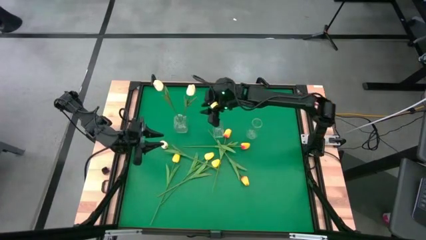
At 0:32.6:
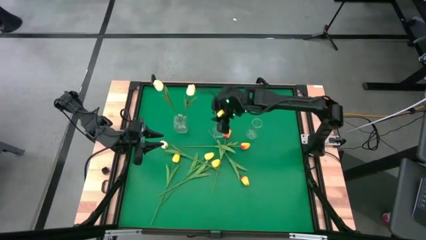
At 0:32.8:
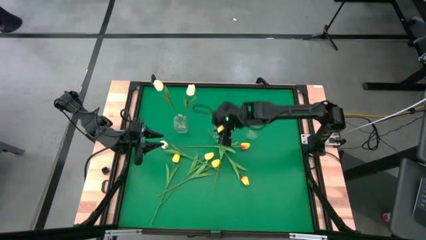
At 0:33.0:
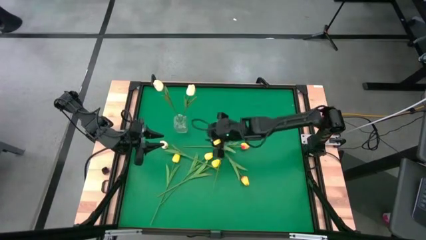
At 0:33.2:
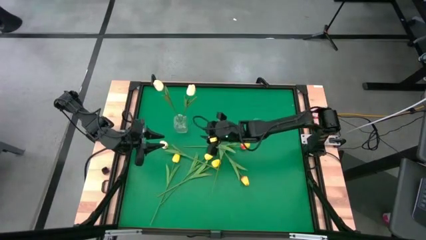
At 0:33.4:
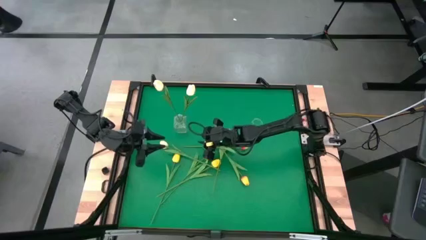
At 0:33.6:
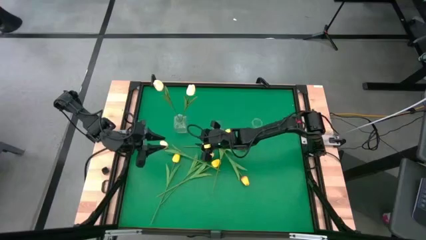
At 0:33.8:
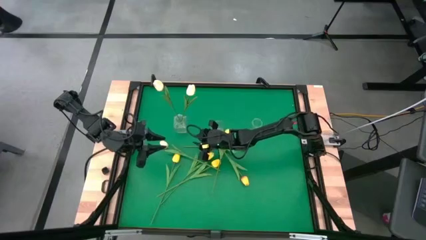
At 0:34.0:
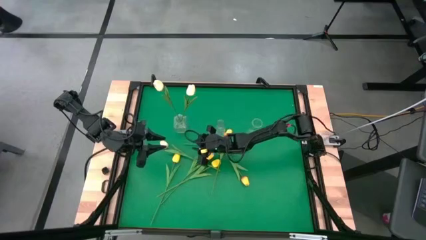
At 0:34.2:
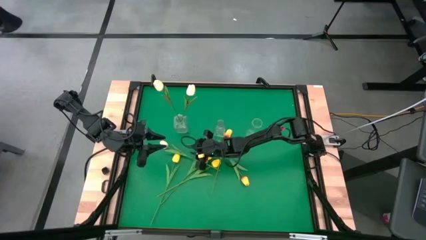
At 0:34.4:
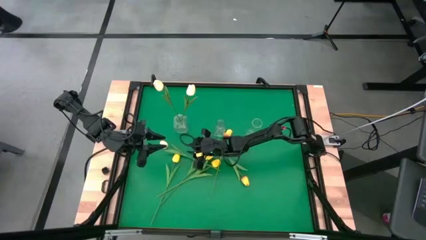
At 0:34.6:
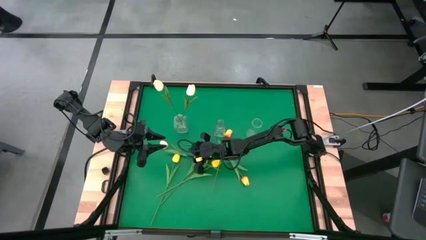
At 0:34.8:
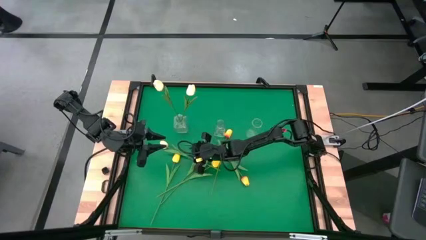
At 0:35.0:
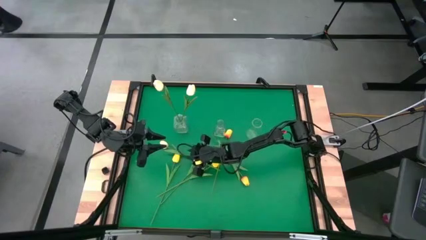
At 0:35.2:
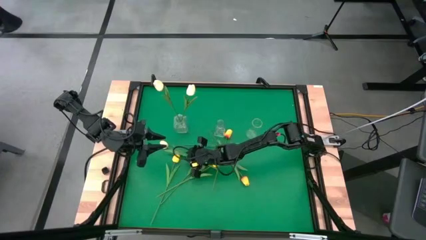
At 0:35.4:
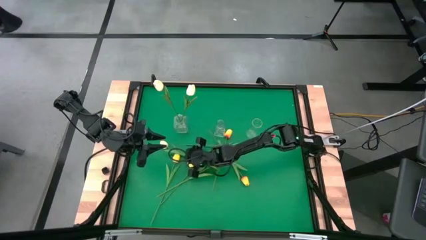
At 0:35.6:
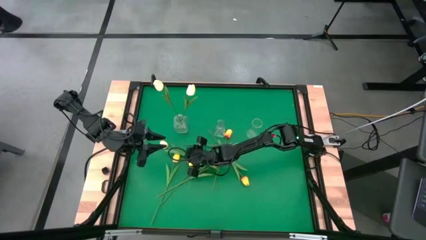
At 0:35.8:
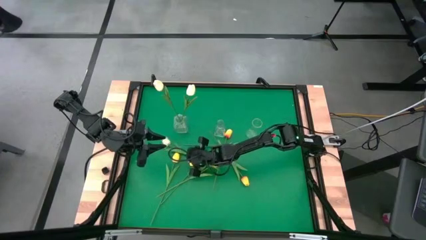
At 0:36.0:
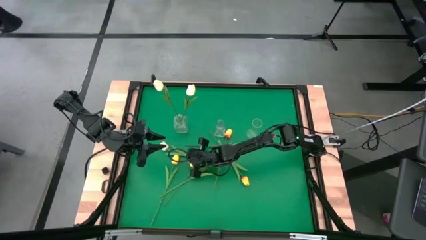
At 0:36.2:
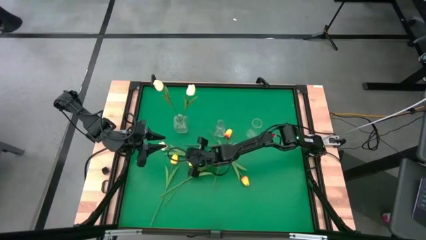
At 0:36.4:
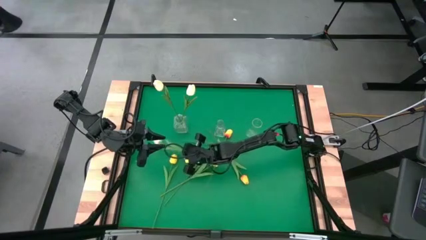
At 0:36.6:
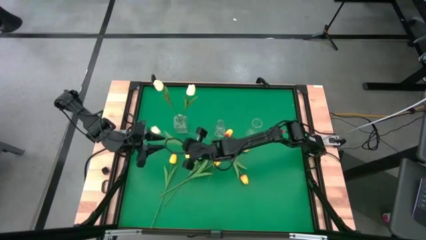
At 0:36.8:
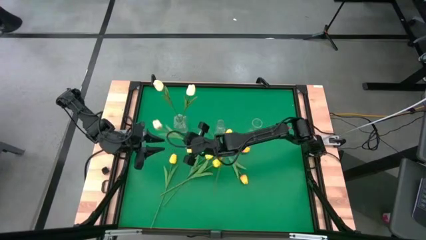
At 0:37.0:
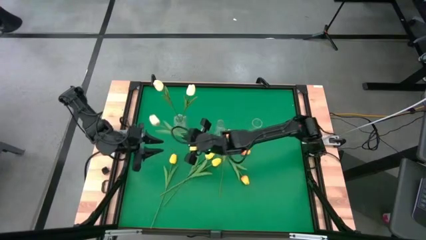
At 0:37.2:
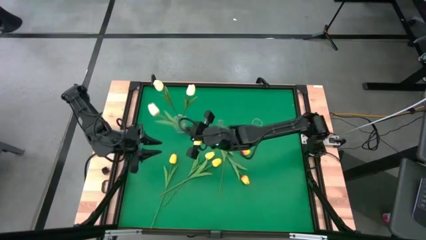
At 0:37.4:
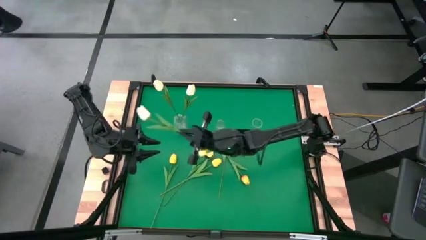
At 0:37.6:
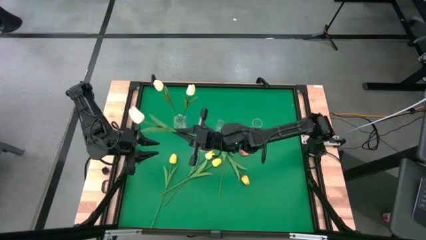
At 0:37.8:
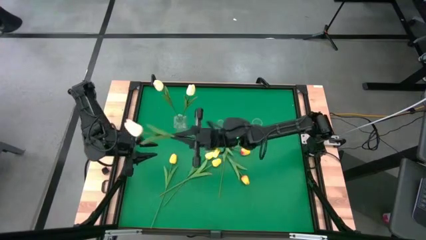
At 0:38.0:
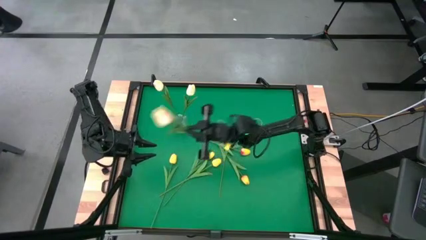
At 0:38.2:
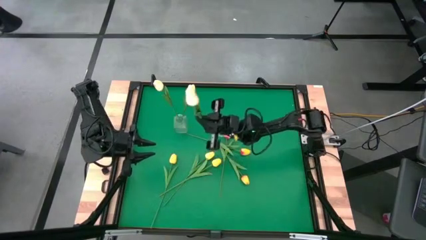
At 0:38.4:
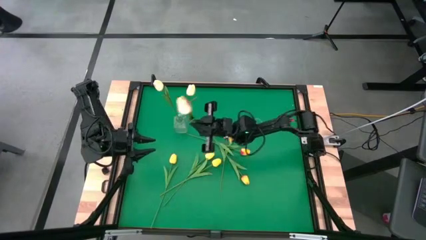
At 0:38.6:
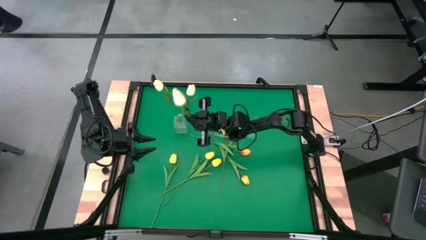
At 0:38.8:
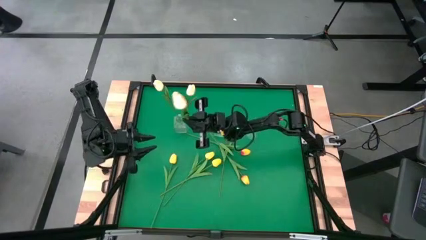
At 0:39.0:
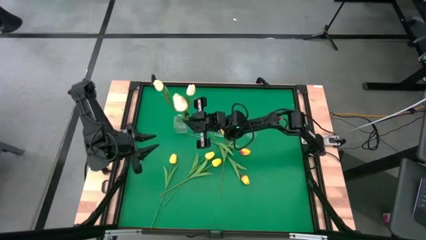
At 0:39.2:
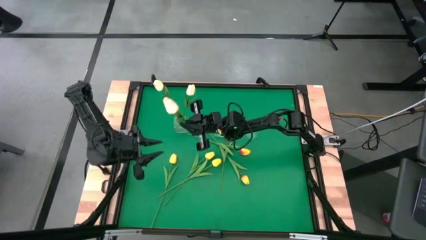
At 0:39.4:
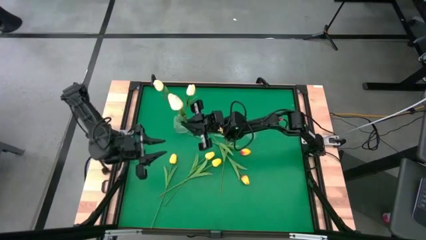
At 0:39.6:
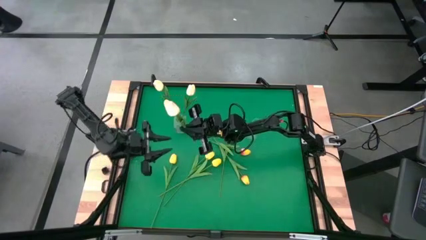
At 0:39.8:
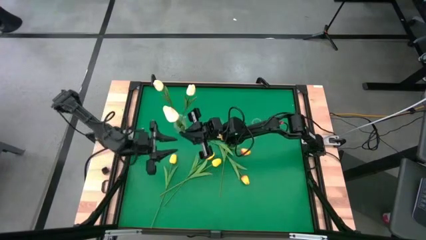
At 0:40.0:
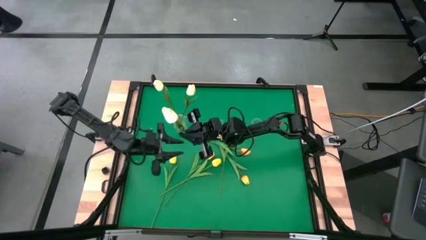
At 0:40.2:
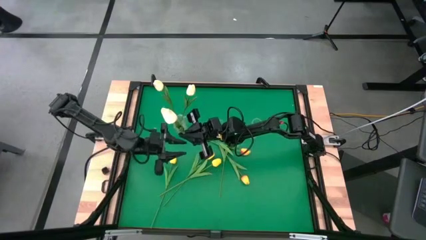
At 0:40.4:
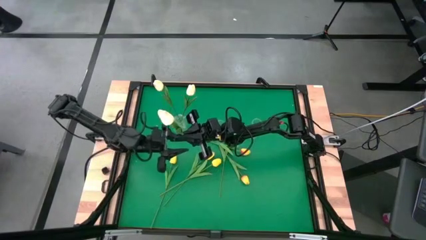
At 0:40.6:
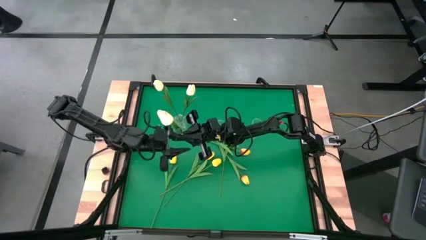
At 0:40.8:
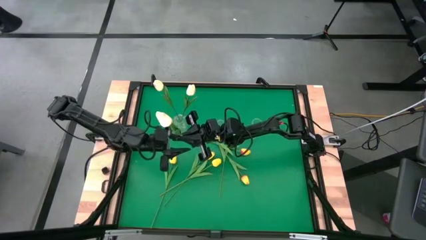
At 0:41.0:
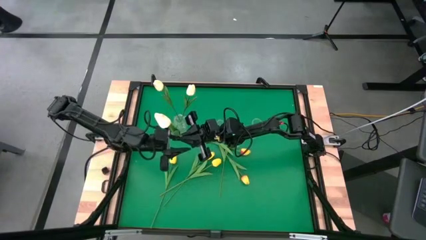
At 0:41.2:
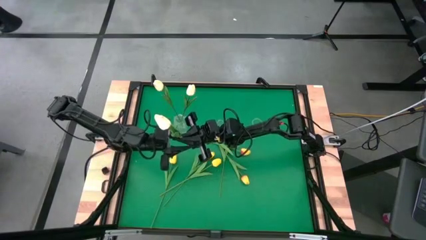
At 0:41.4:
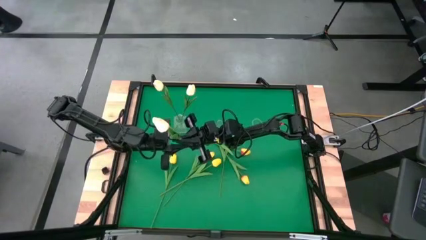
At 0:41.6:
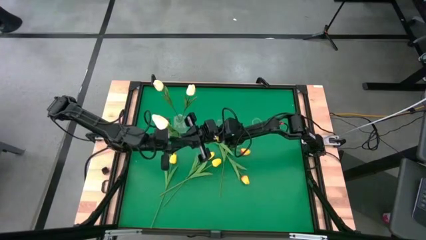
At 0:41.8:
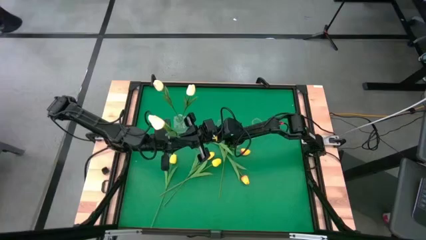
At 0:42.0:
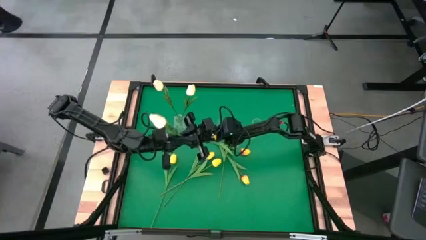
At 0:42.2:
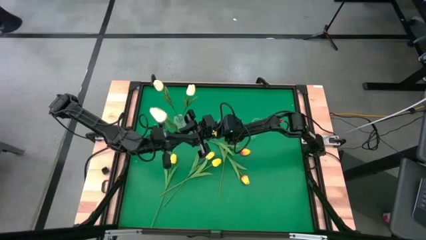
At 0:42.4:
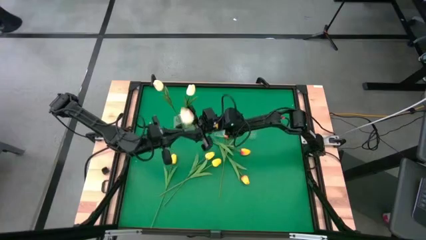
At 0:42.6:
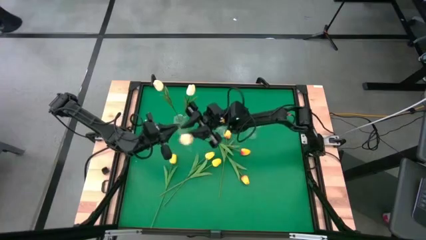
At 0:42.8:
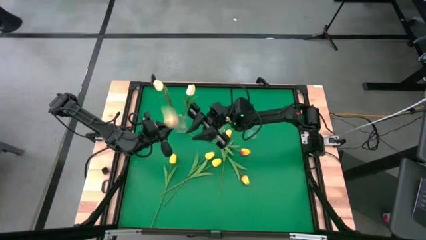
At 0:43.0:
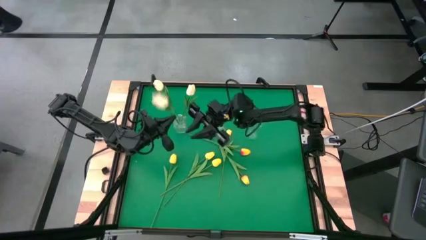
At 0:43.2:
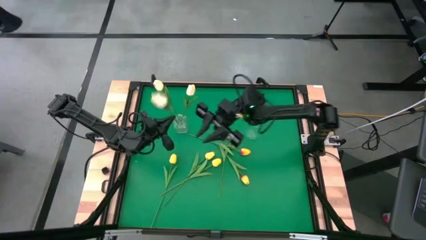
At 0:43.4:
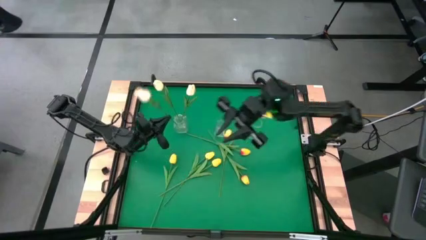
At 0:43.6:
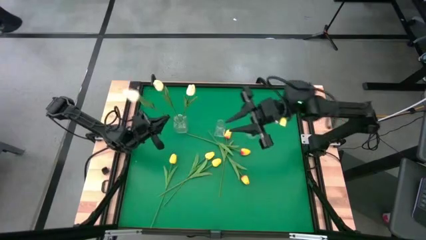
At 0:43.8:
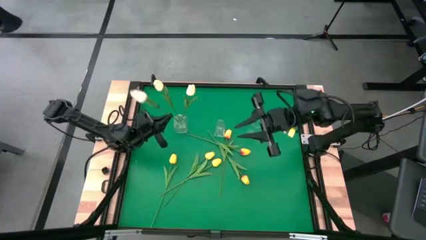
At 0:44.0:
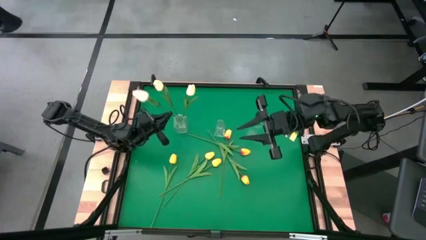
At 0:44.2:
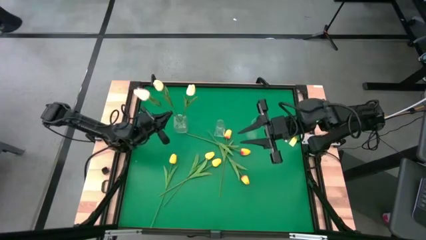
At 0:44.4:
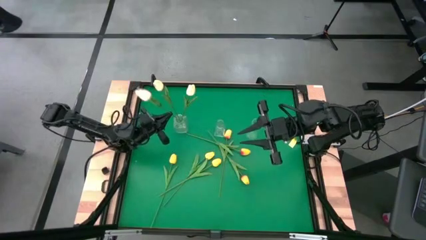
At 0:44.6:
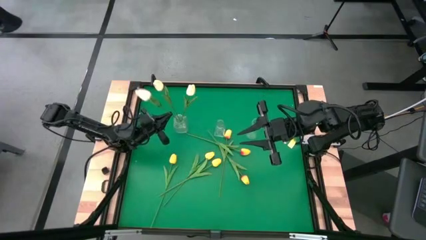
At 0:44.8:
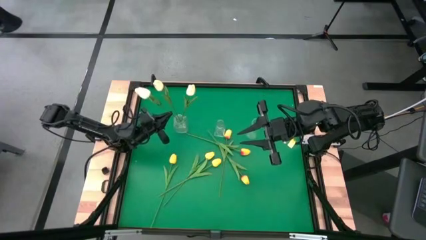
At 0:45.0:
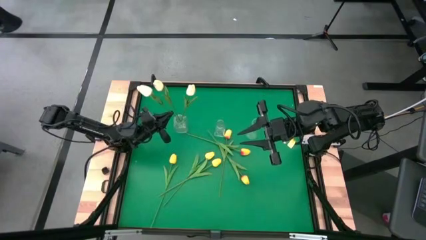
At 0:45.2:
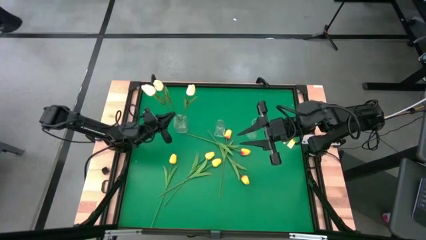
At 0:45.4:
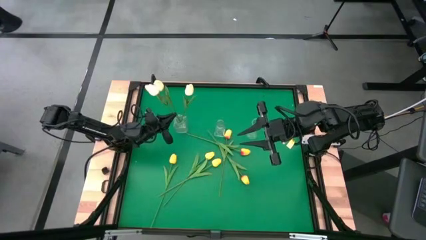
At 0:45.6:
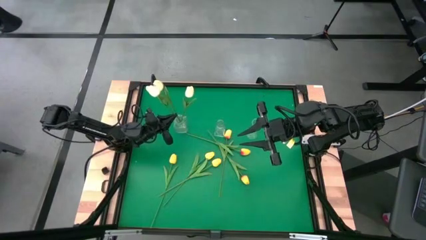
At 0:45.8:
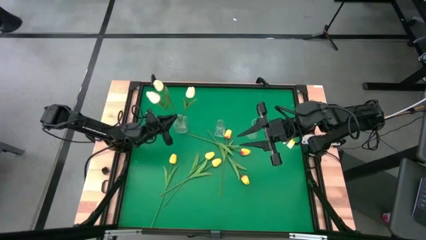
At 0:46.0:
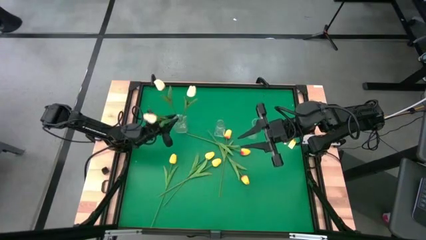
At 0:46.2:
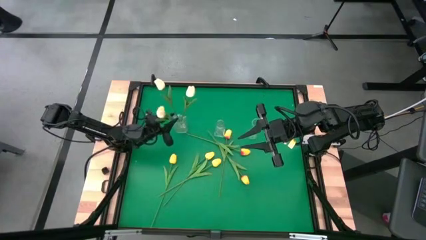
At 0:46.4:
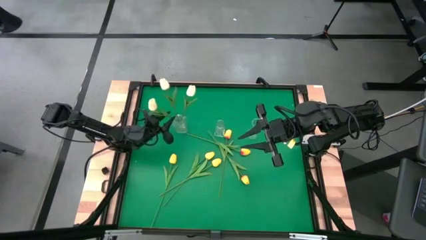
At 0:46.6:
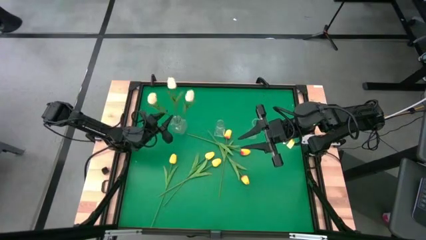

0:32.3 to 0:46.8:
Task: Sort flowers into vase by color
Put the white flower into the left transparent vase

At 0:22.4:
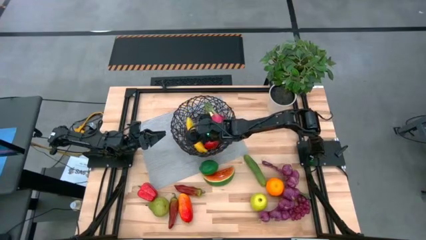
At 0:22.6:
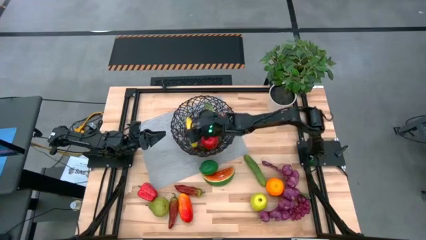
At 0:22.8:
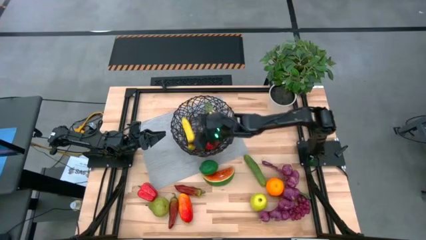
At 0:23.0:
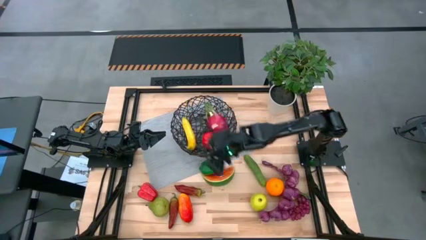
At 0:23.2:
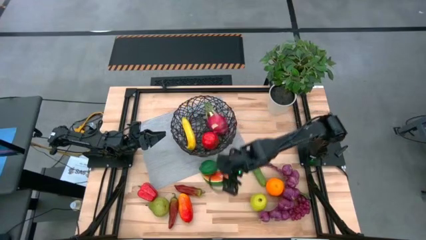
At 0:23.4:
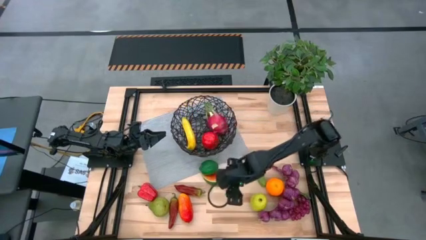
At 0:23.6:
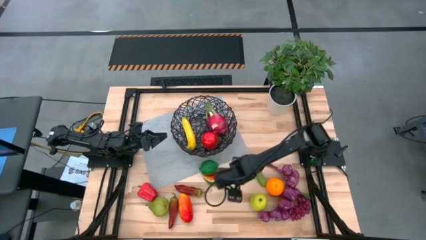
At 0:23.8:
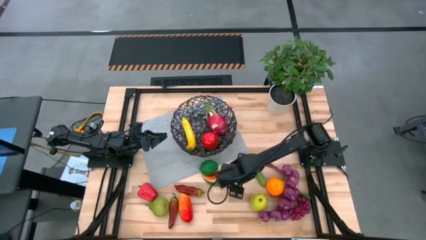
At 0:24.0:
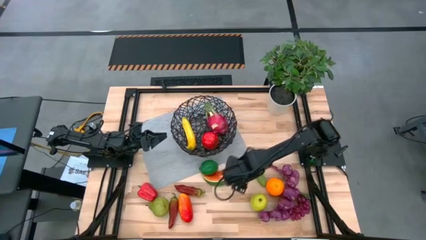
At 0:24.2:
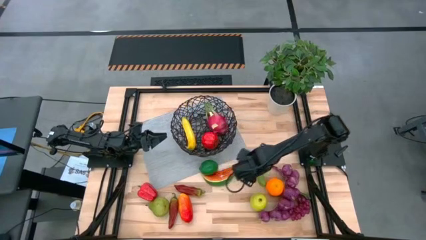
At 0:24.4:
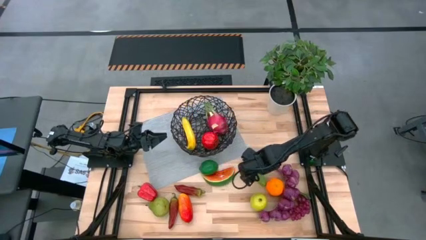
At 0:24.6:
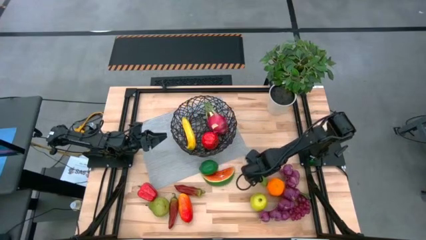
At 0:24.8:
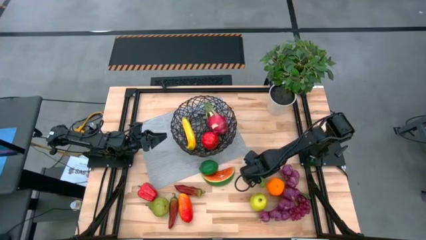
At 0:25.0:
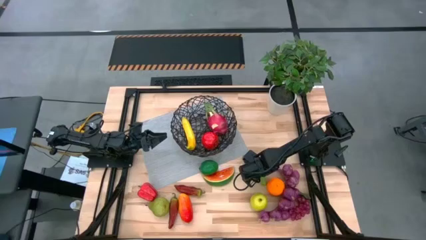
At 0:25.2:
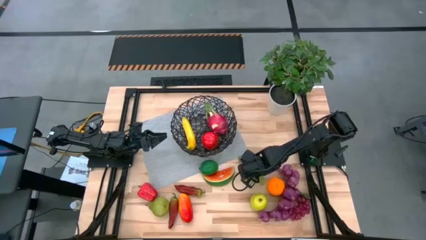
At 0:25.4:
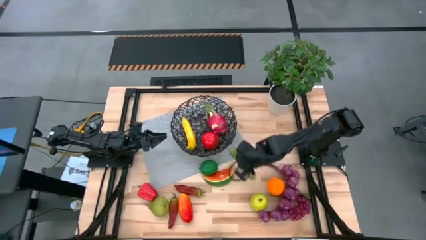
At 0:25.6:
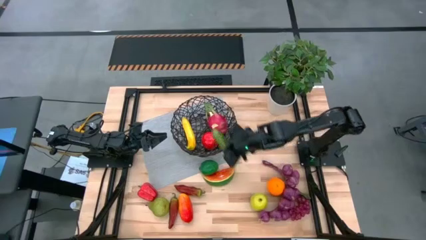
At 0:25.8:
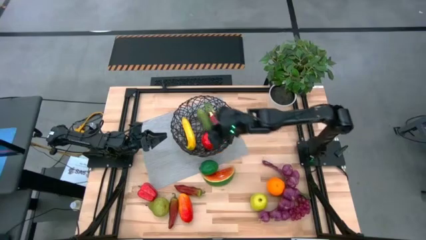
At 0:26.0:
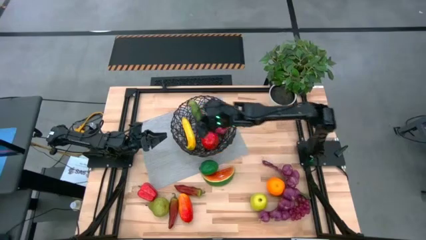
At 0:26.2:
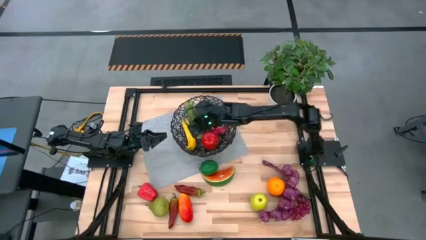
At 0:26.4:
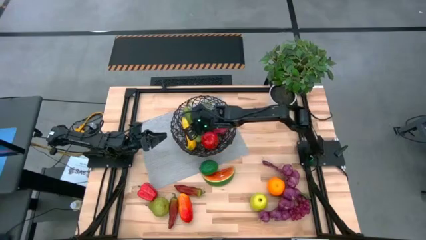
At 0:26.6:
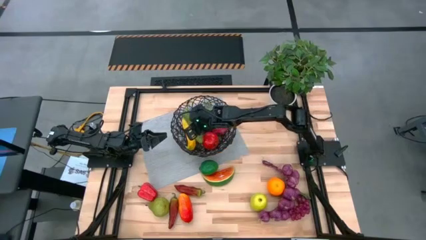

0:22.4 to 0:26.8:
Task: Build produce basket
Put the cucumber into the wired basket
